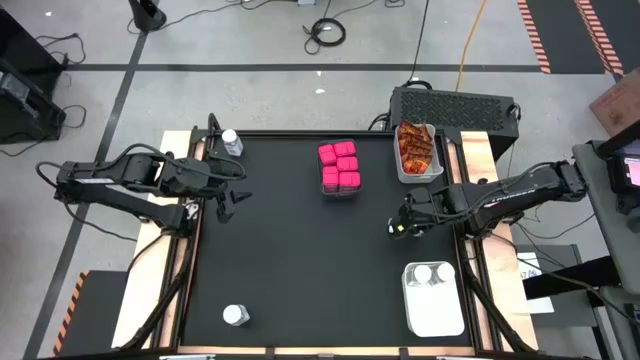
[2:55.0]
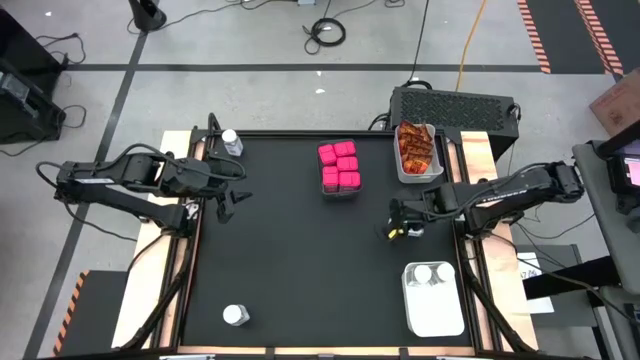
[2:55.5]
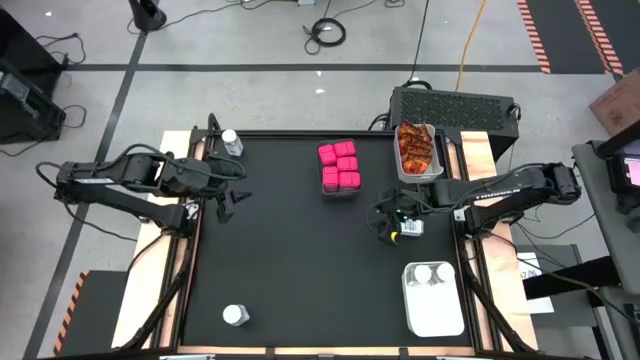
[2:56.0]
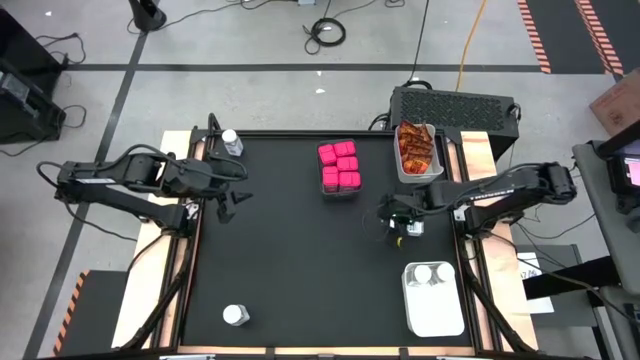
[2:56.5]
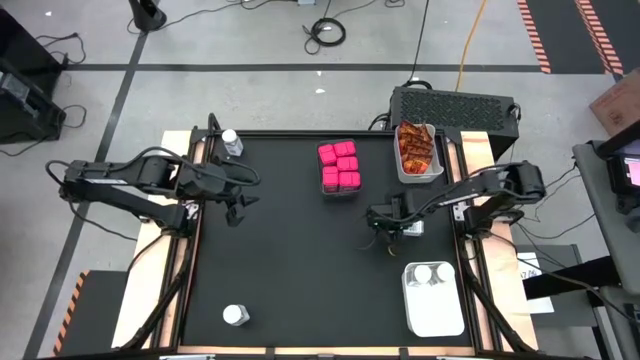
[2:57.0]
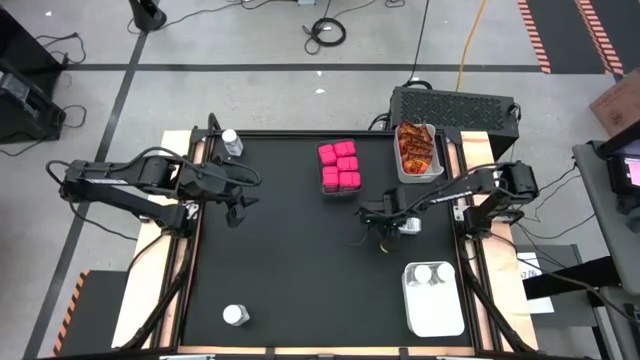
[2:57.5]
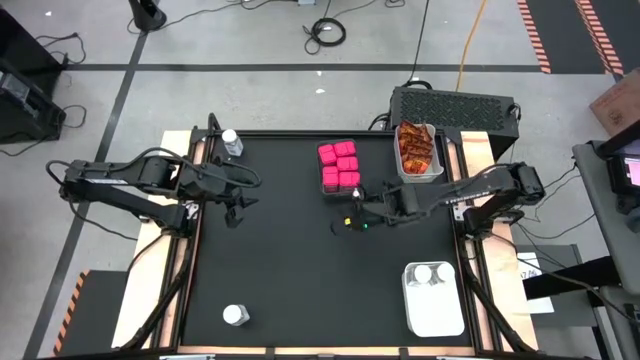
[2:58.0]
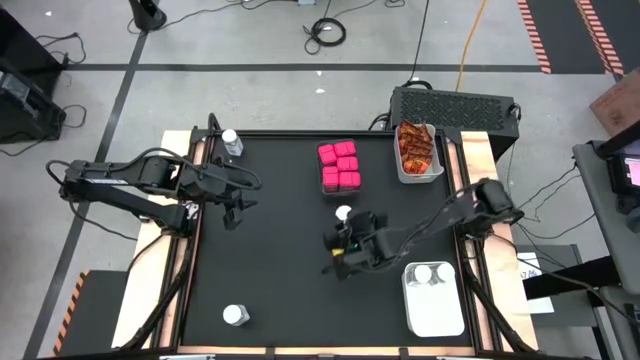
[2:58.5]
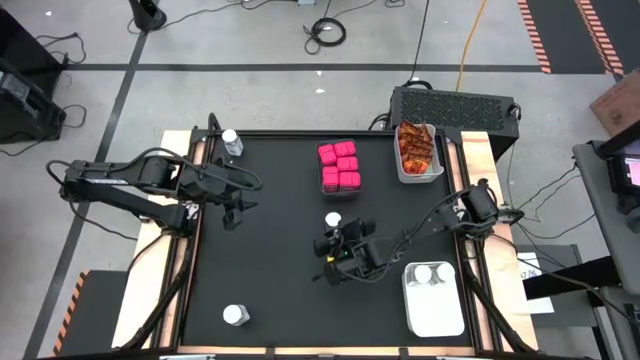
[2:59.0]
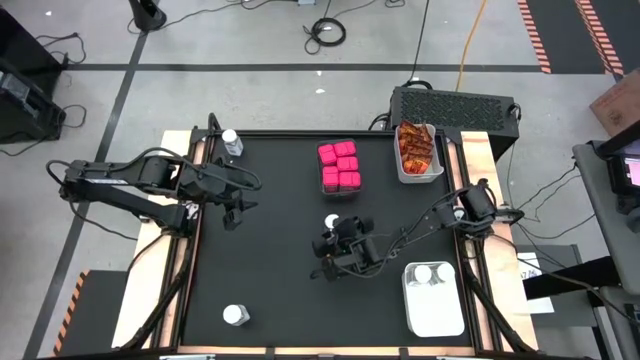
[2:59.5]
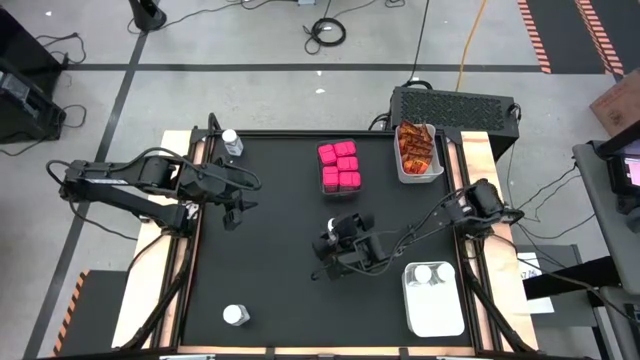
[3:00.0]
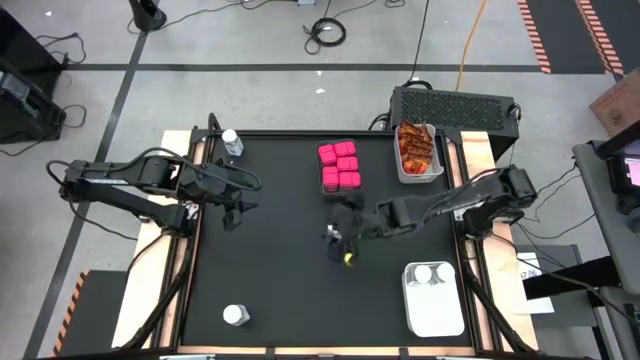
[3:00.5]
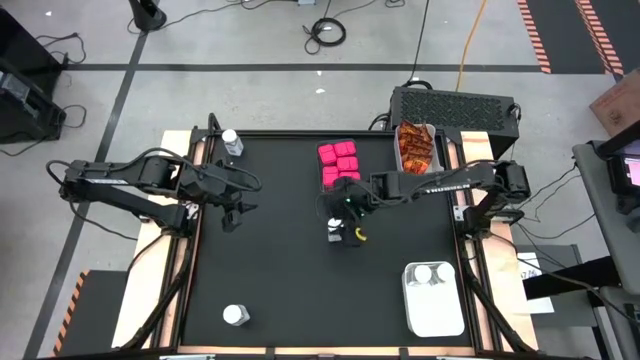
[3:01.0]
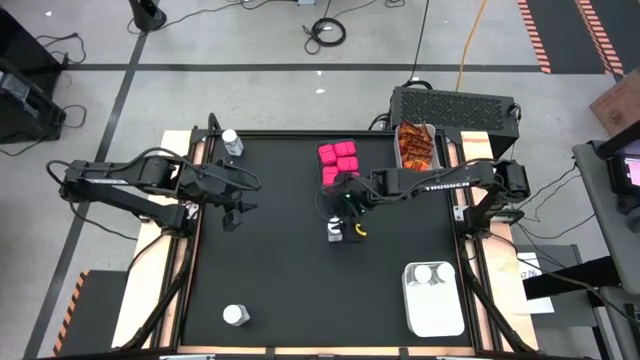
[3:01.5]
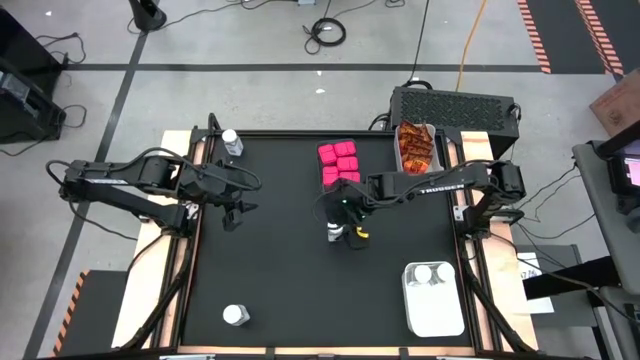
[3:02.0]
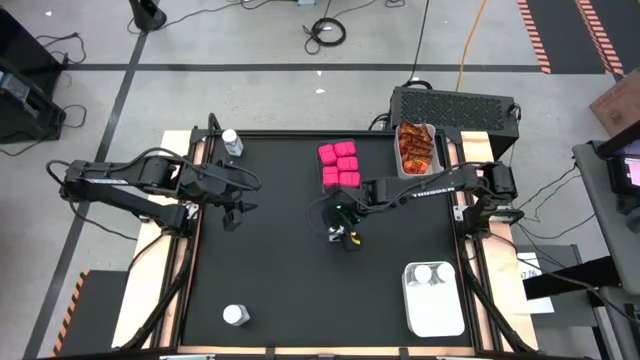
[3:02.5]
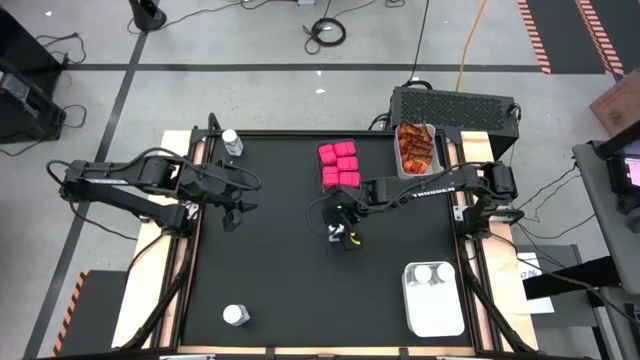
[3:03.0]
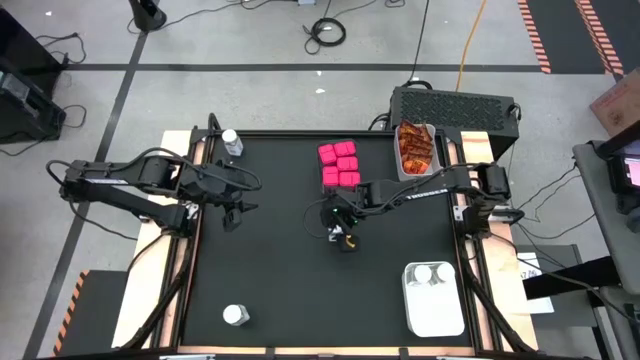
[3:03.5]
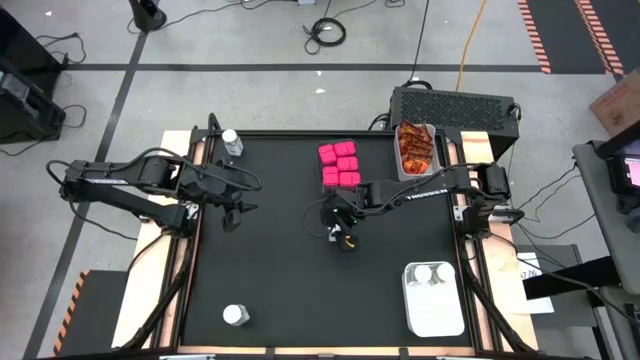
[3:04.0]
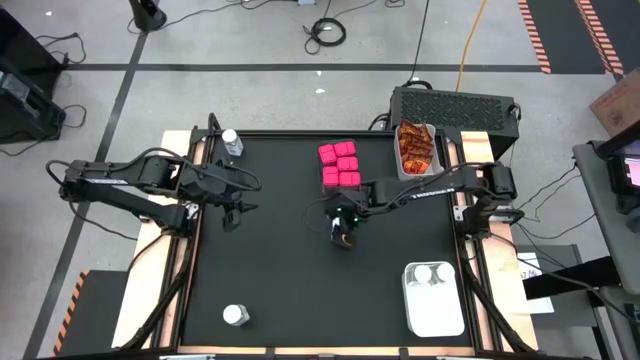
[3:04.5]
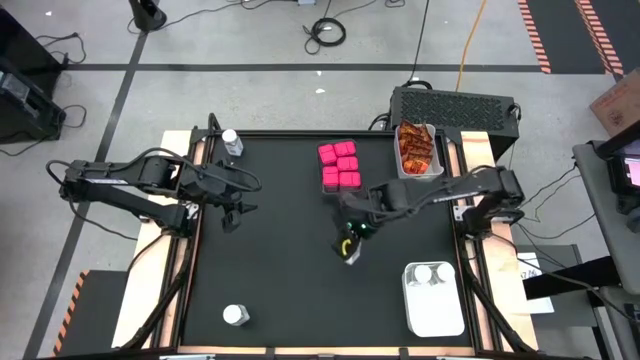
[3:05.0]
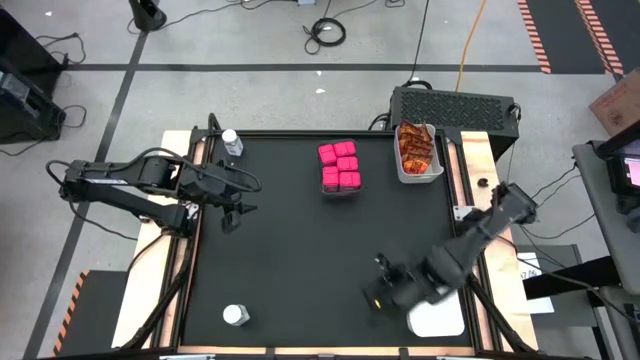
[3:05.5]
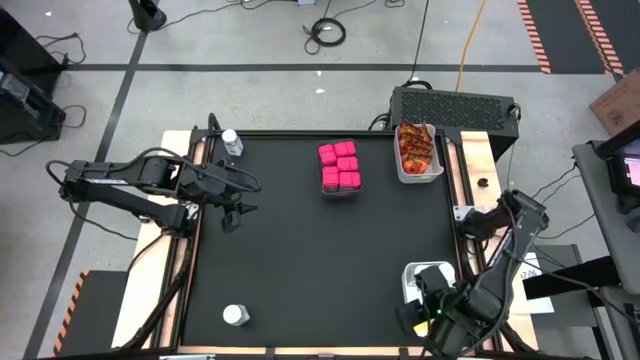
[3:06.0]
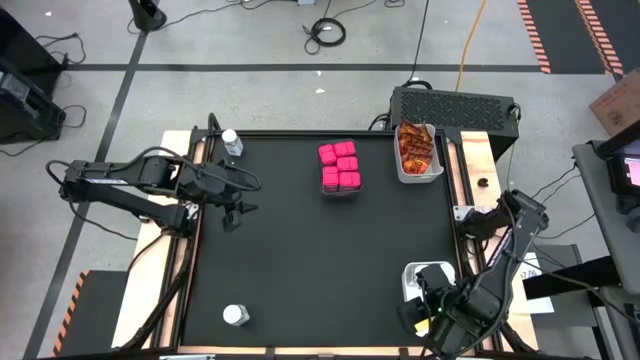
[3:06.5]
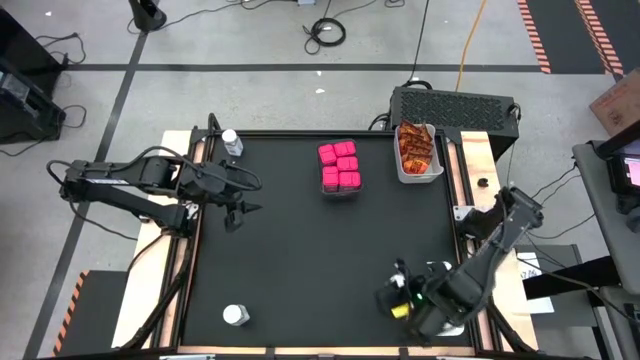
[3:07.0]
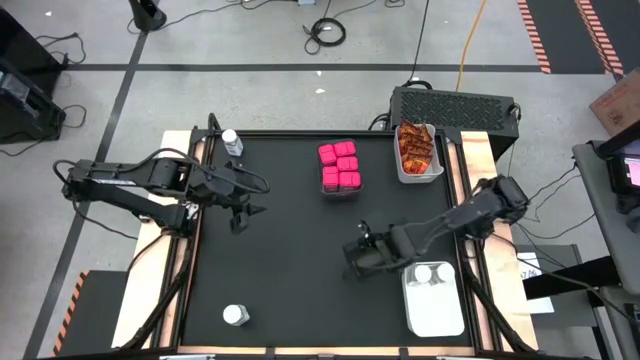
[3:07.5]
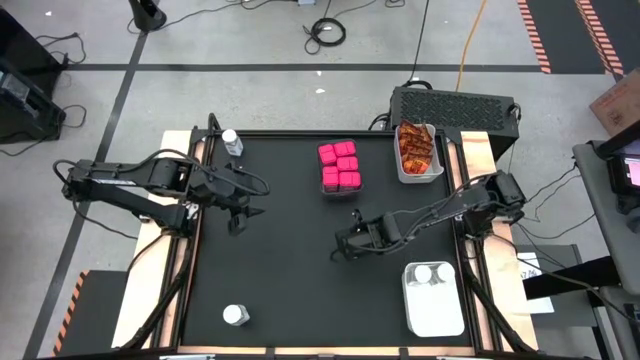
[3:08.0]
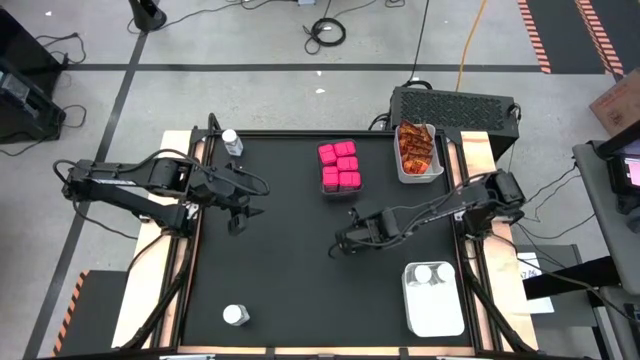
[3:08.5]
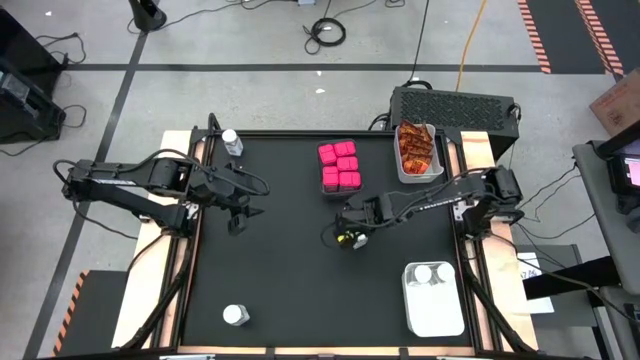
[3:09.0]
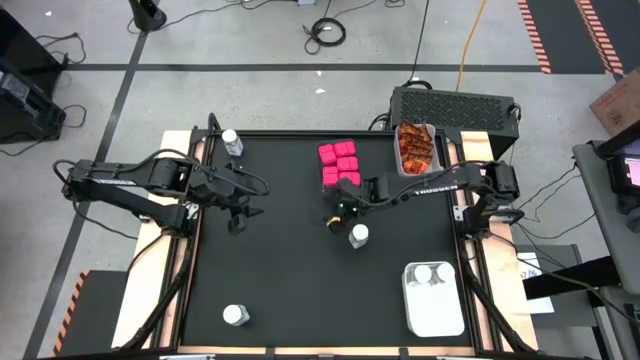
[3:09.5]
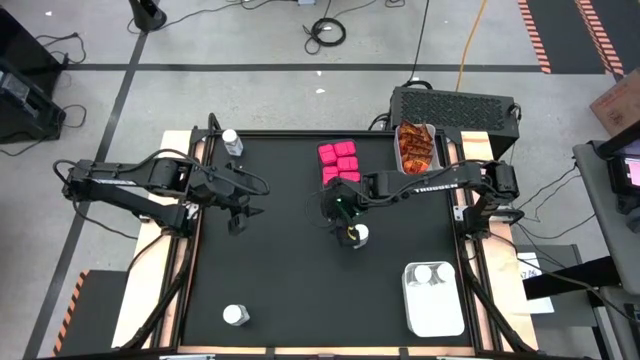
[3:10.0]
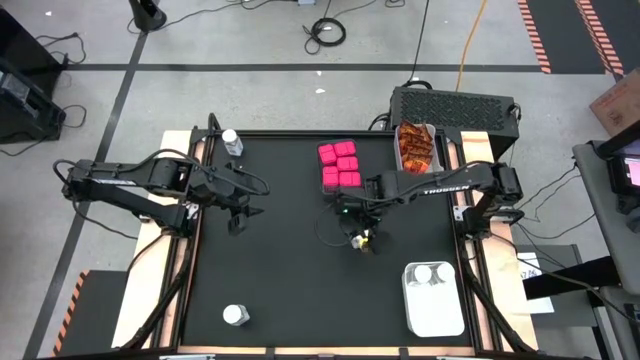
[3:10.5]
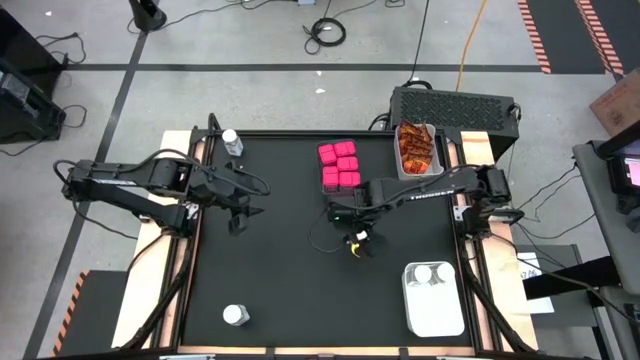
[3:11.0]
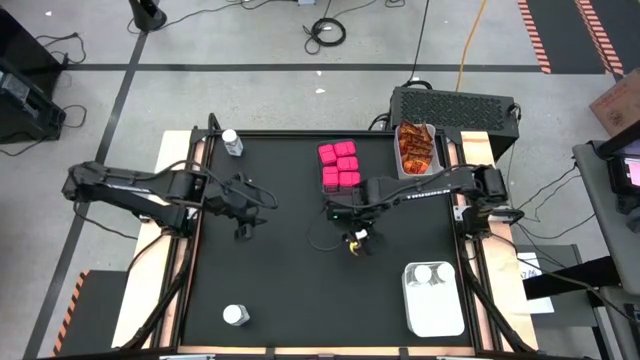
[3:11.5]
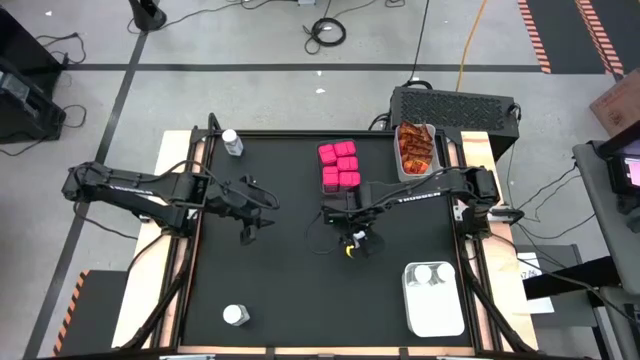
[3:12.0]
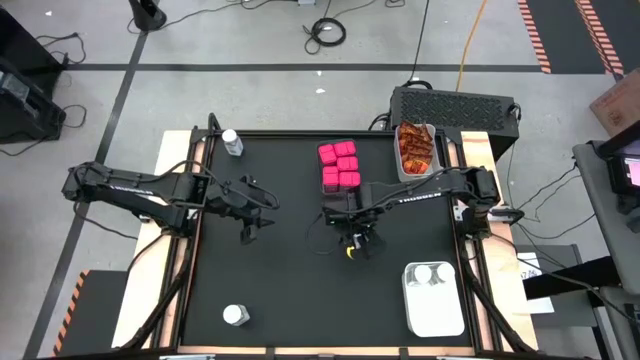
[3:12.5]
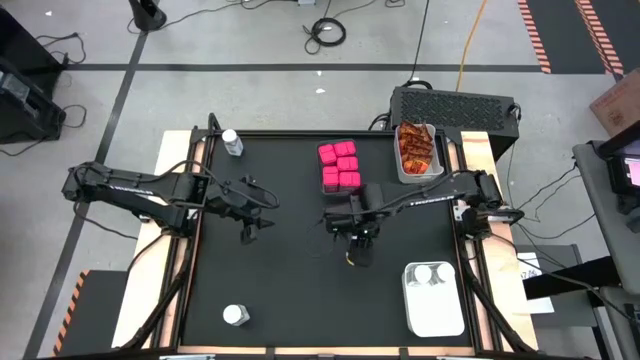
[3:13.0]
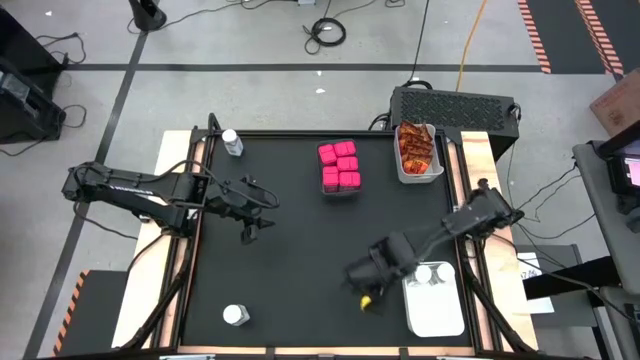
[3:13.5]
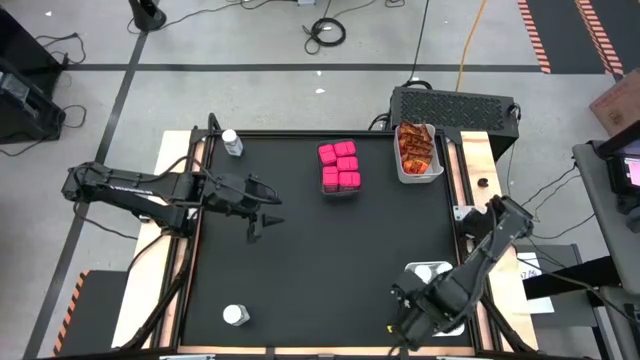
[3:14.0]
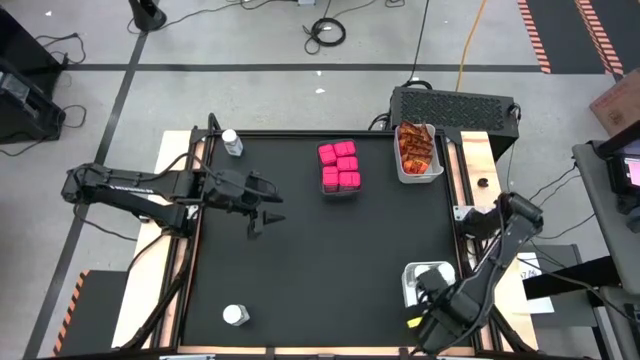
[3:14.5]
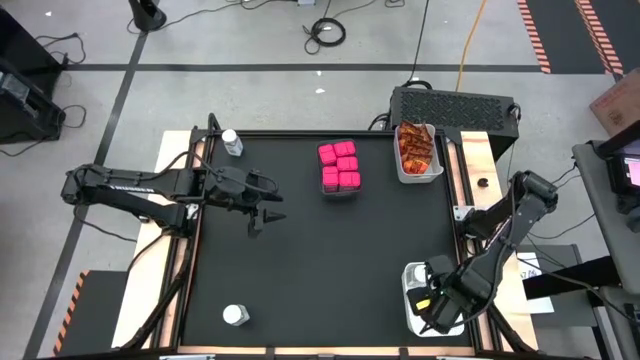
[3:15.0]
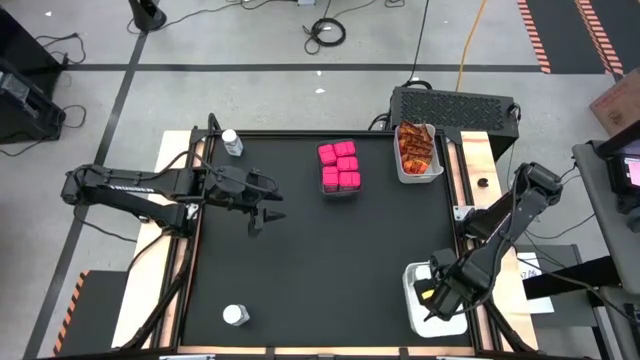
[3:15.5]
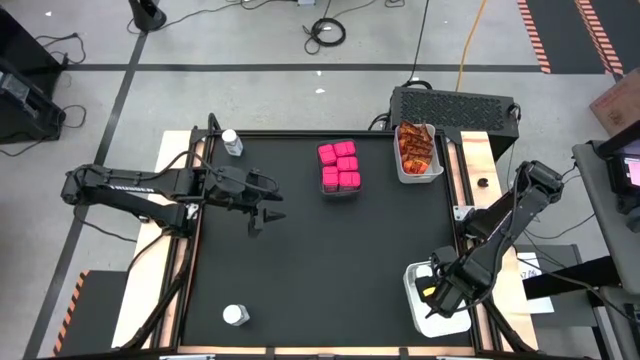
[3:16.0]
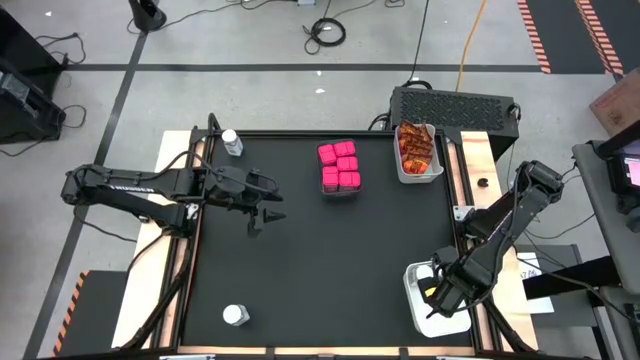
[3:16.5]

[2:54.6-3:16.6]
Task: Sort spices by type
Put the white seasoning bottle into the bottom white bin
